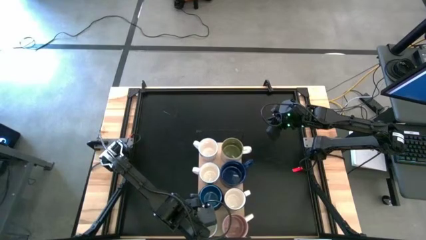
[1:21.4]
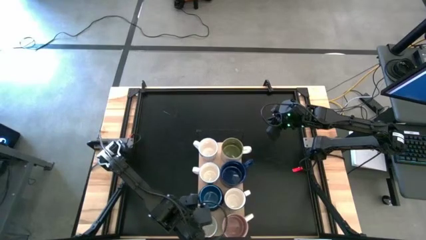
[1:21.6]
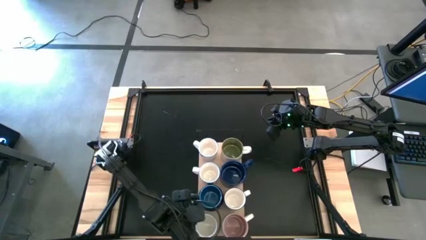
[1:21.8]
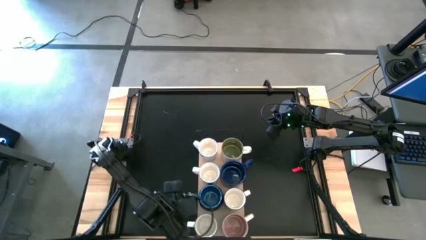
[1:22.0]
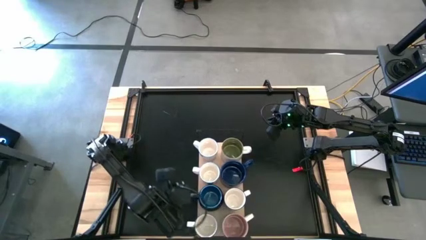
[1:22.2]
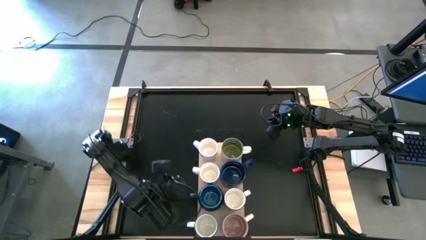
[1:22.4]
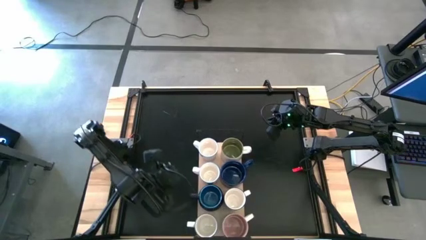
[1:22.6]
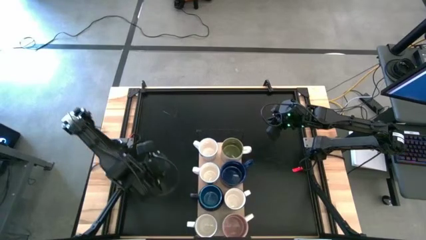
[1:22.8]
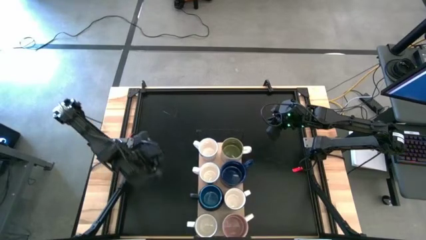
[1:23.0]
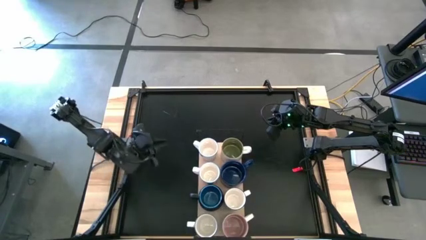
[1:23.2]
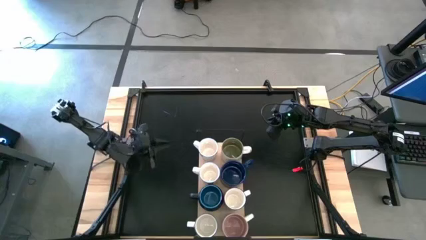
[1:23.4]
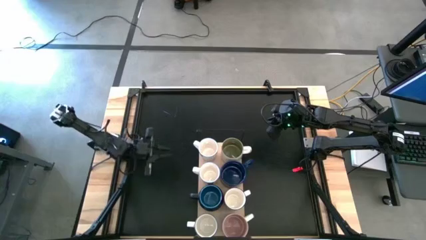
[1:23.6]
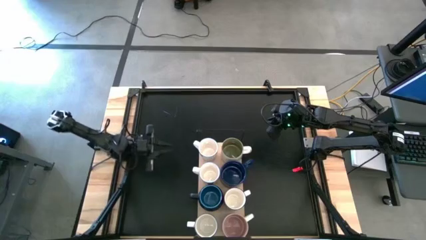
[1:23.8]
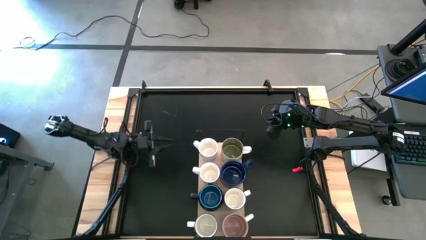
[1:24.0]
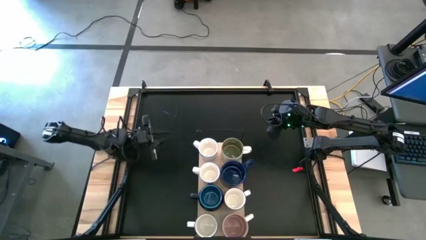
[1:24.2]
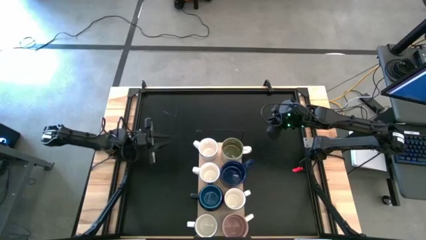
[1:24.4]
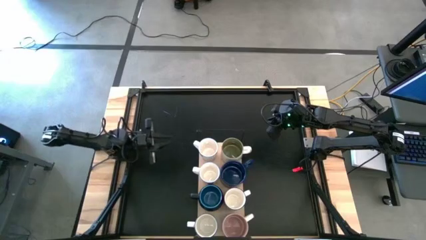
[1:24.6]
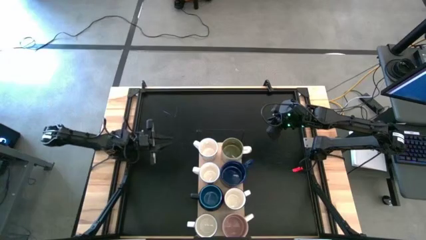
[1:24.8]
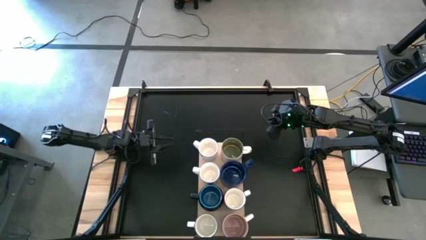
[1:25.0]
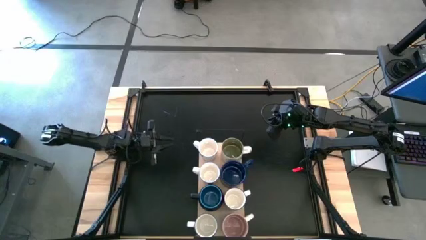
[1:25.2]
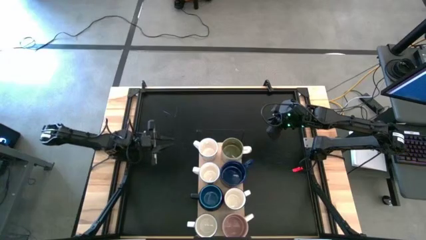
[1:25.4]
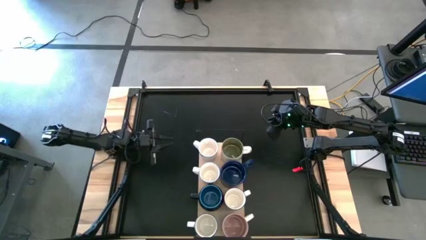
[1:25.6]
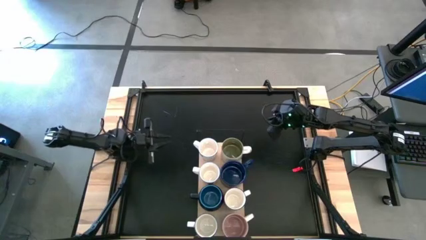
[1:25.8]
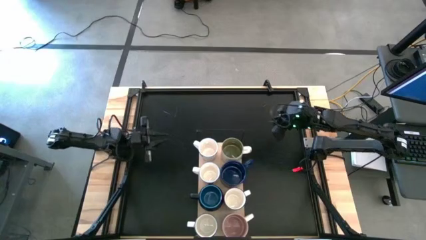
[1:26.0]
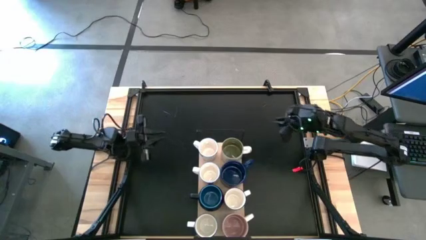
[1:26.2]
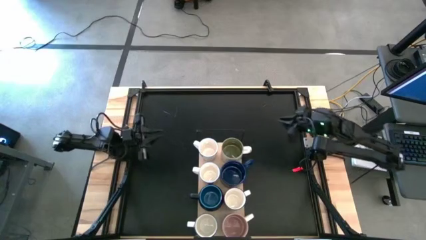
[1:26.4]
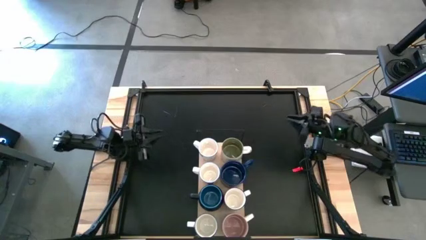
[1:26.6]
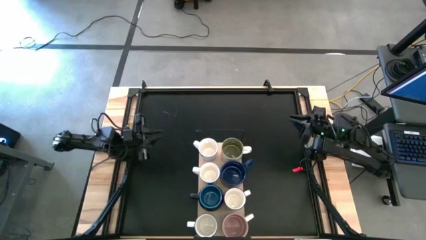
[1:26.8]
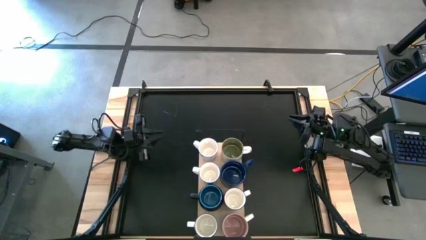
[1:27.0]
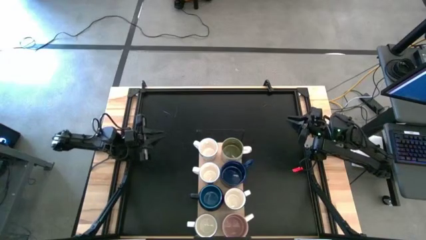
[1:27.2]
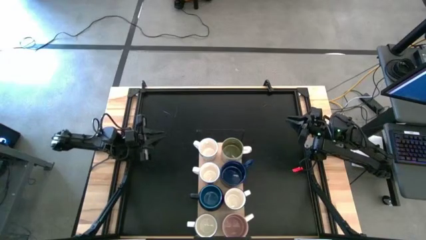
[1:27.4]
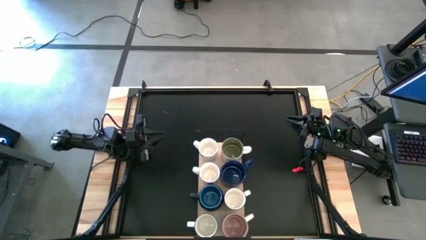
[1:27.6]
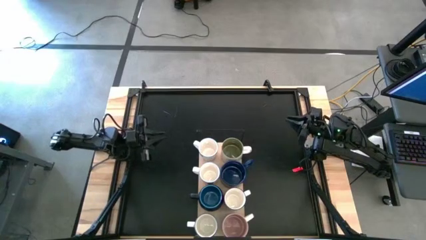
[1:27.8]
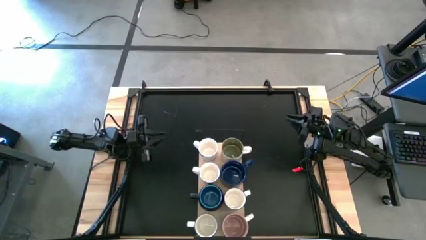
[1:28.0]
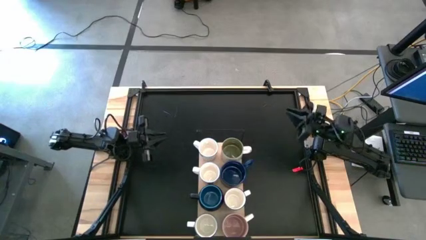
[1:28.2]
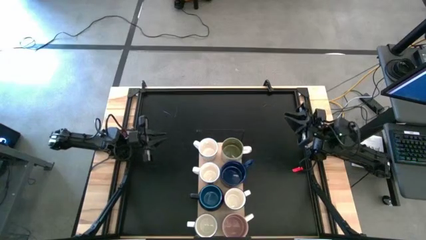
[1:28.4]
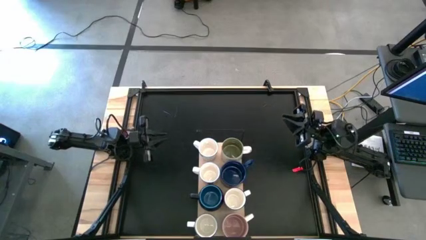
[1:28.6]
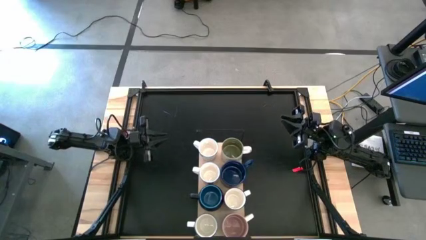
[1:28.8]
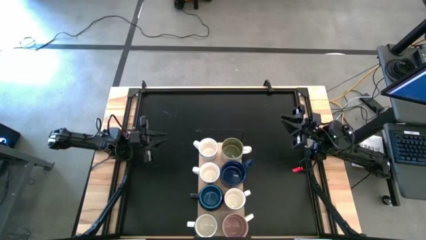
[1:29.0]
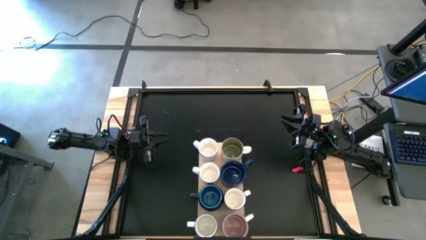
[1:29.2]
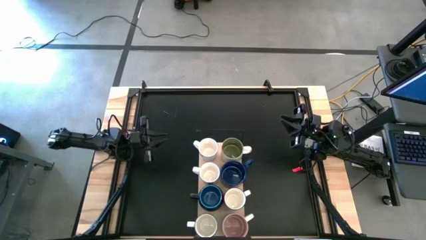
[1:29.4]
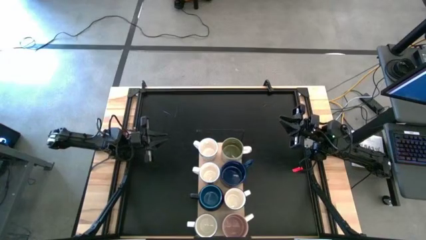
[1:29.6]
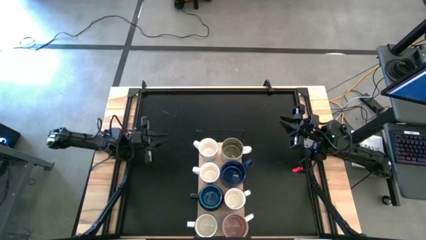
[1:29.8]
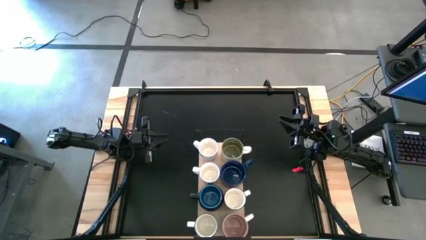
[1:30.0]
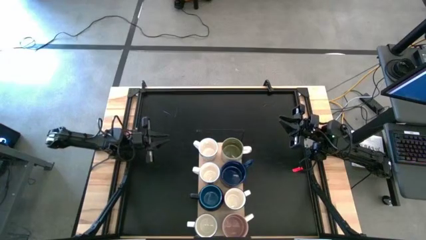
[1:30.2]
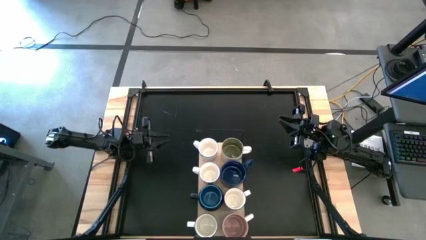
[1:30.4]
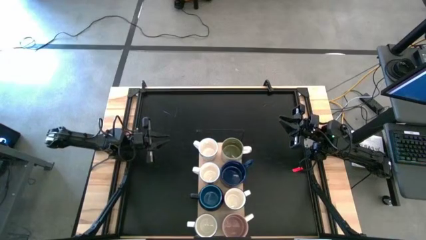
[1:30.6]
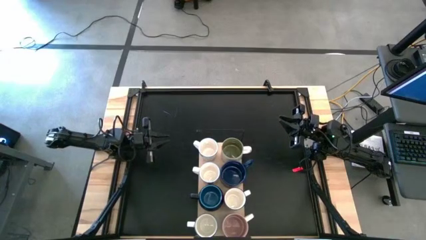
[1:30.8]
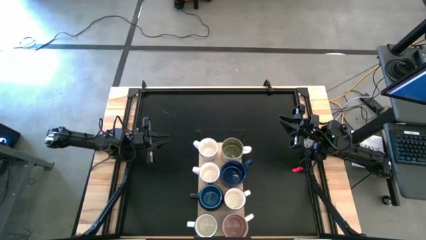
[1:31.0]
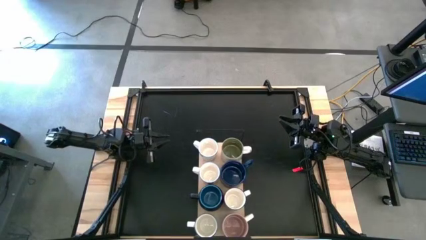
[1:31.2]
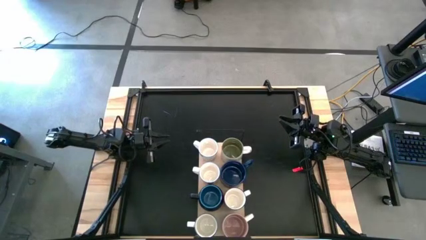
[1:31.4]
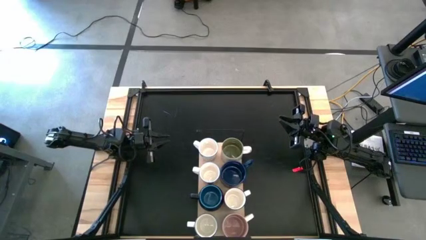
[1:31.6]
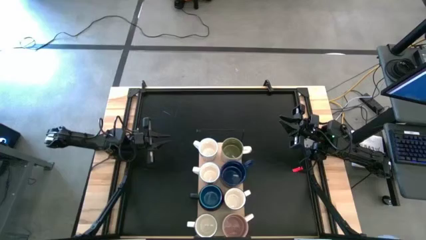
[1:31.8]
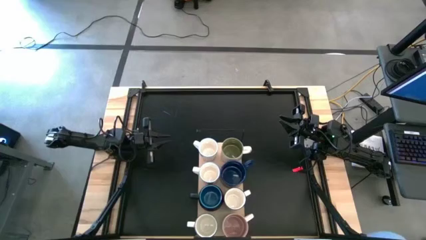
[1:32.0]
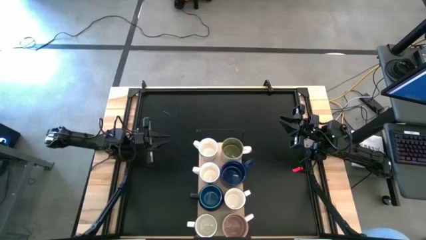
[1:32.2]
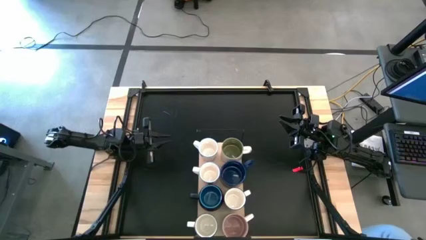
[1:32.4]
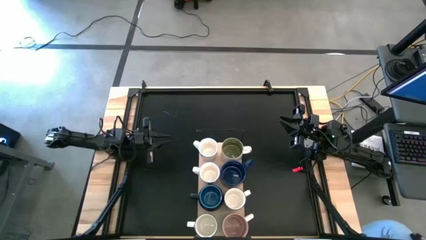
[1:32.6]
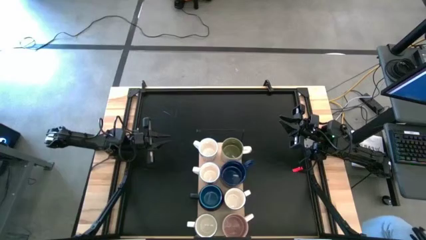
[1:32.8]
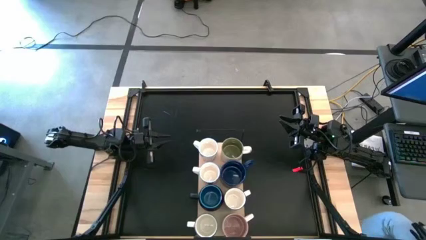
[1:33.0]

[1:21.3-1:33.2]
Task: Place coffee mugs
Return to Home Position

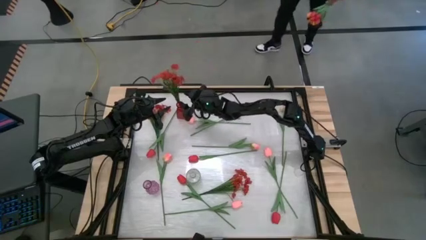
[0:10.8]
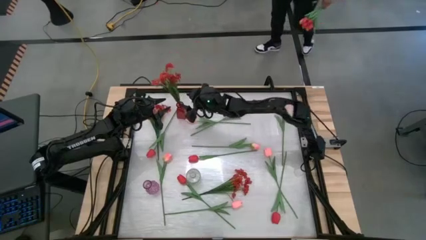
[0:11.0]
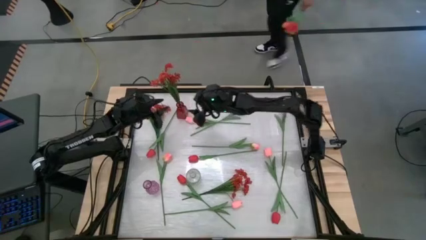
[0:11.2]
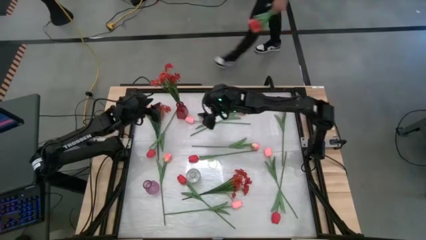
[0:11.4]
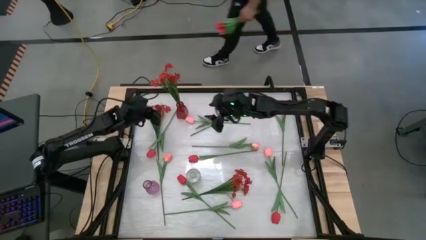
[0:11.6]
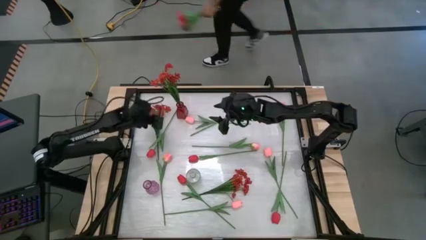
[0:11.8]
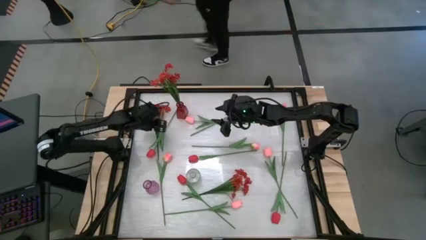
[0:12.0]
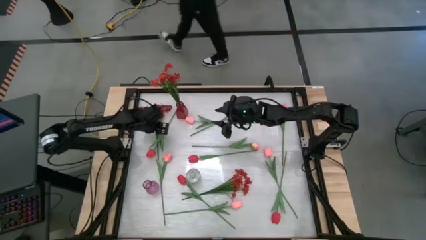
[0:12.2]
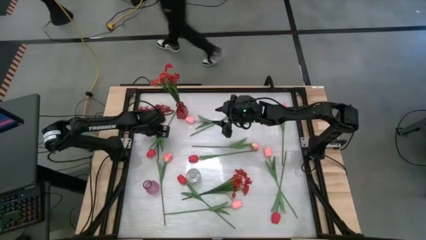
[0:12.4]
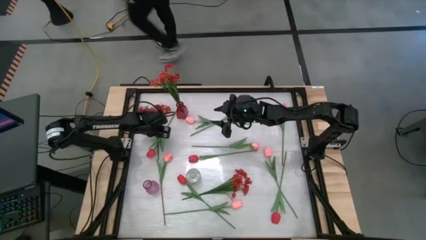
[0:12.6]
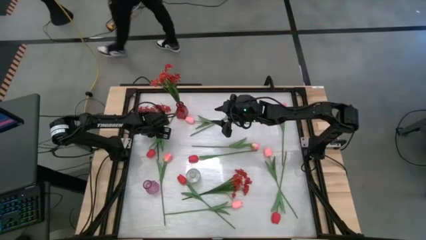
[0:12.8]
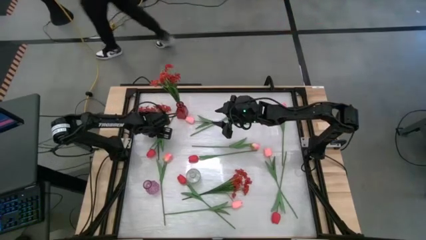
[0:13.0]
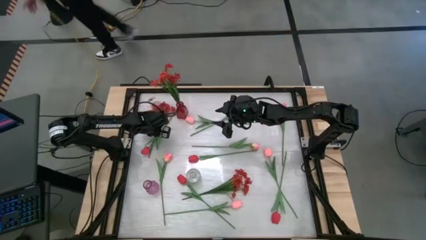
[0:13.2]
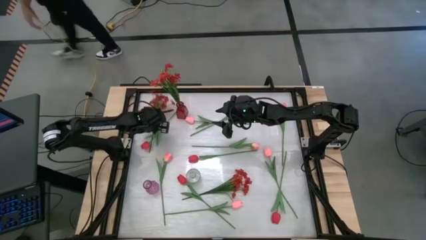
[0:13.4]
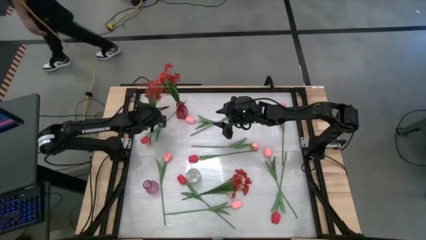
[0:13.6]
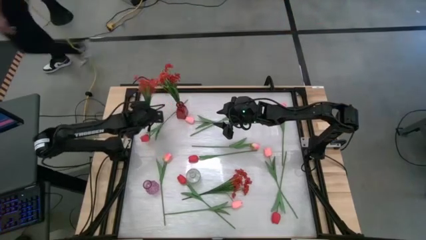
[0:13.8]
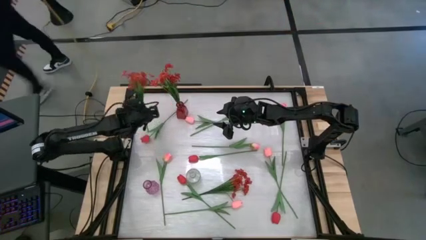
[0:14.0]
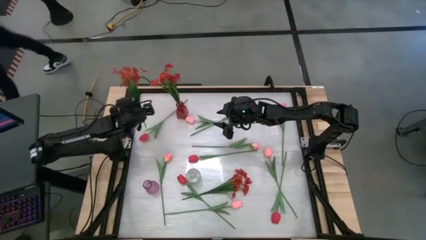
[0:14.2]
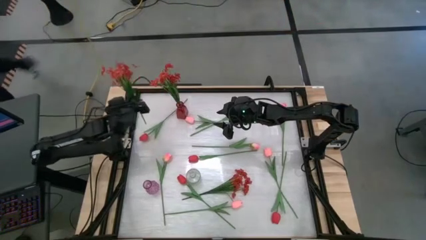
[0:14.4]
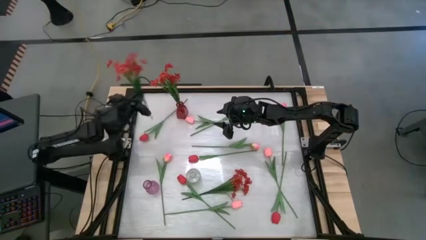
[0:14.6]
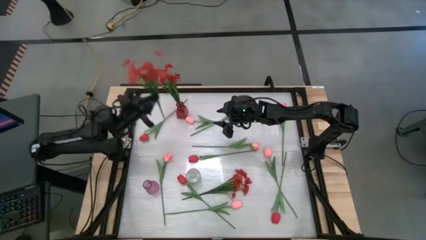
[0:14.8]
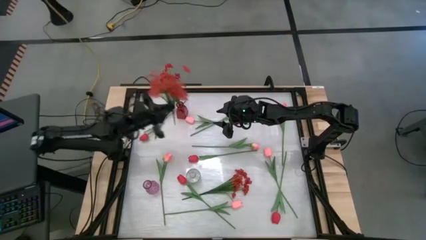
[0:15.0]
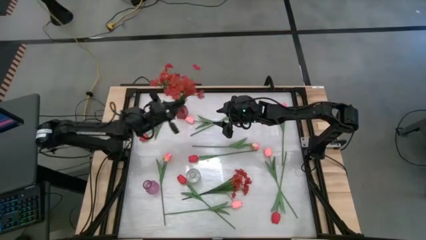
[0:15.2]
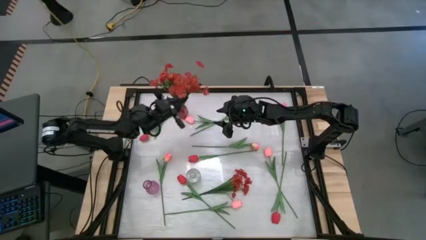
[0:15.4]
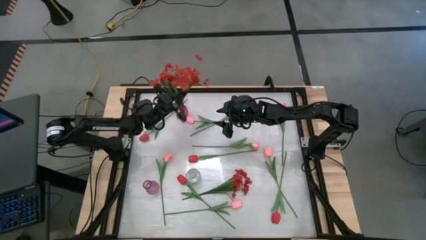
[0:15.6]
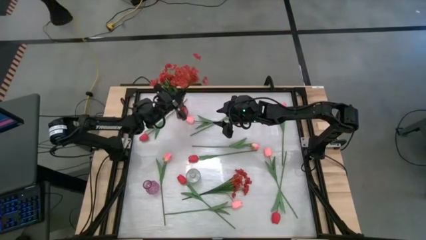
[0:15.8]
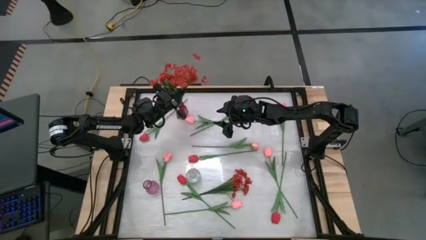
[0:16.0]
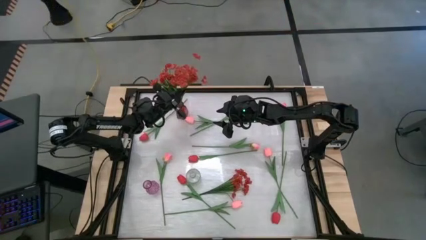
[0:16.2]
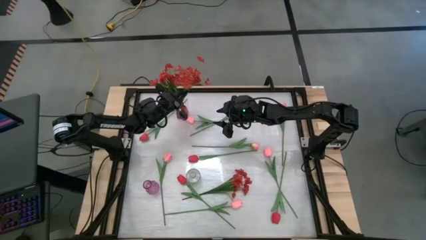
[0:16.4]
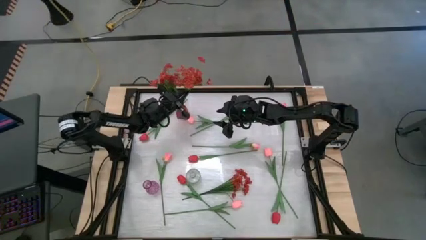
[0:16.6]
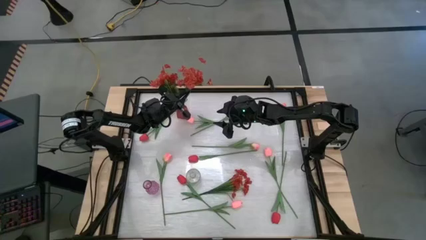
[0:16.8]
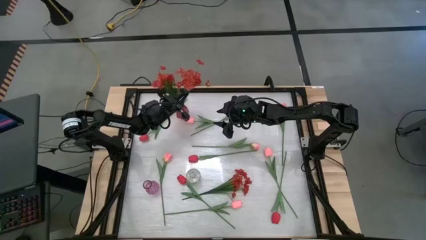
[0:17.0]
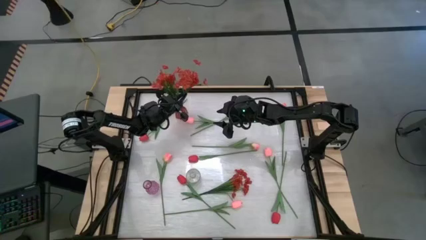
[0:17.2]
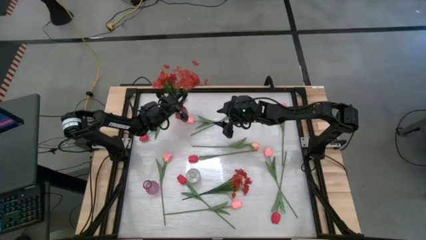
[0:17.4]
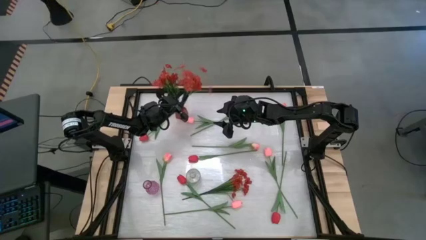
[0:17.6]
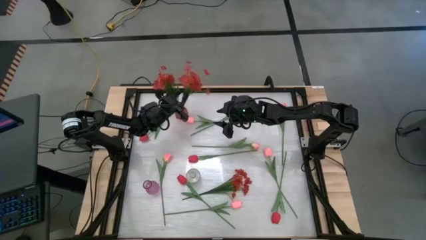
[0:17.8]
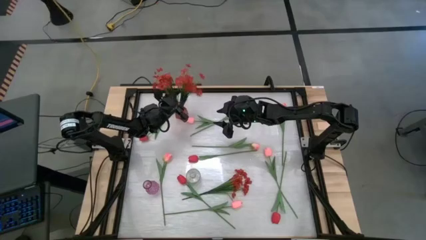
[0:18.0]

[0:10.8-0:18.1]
Task: Sort flowers into vase by color
Put the orange flowers into the red vase
